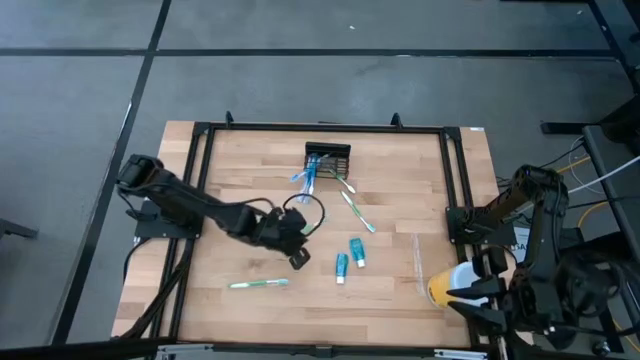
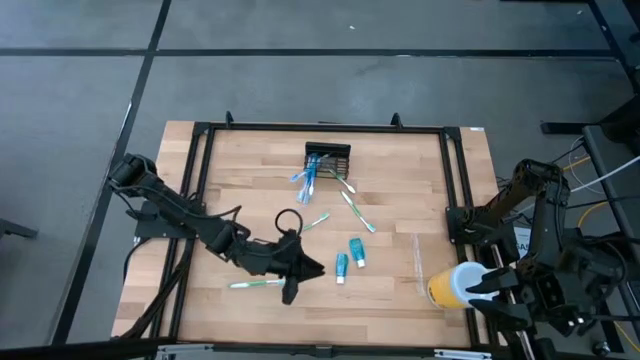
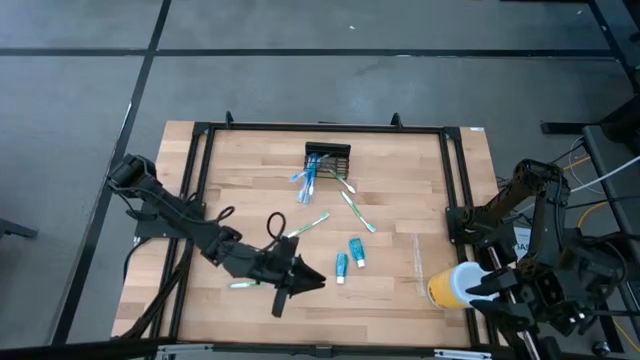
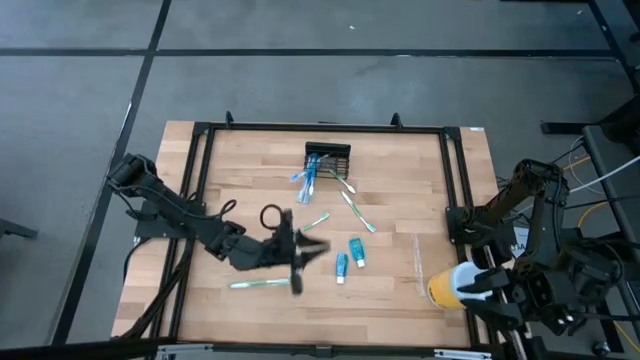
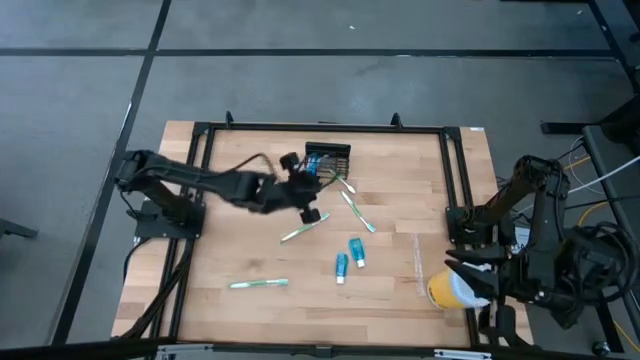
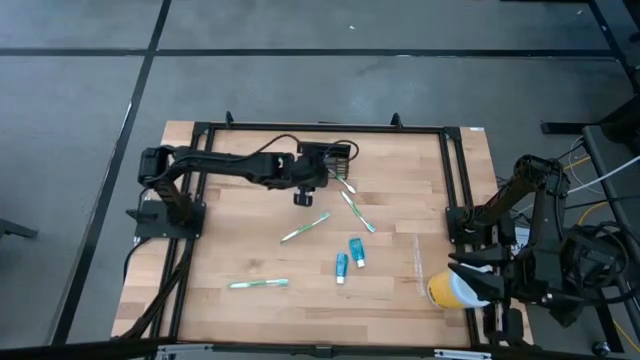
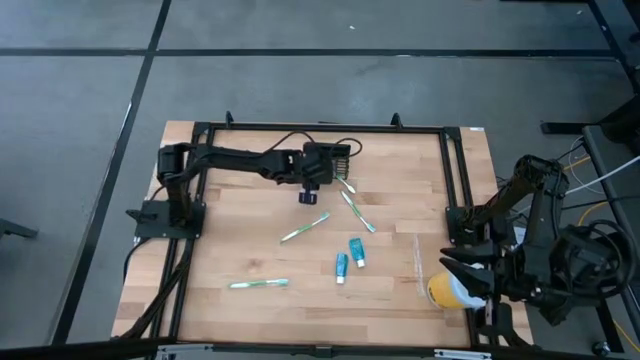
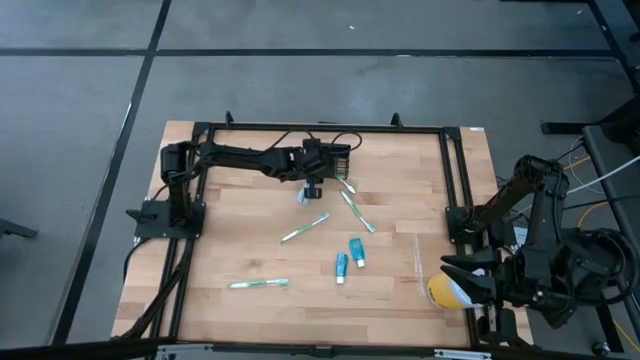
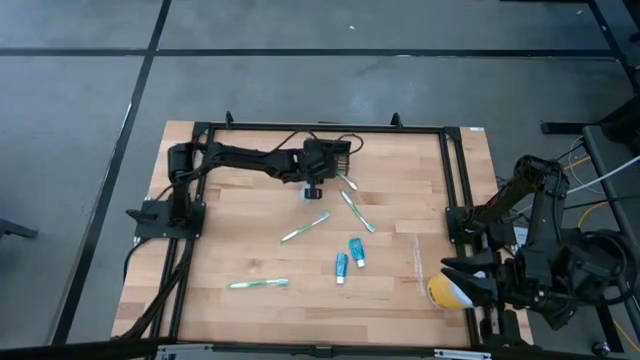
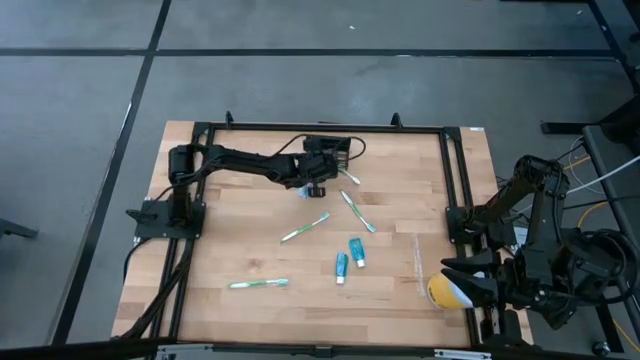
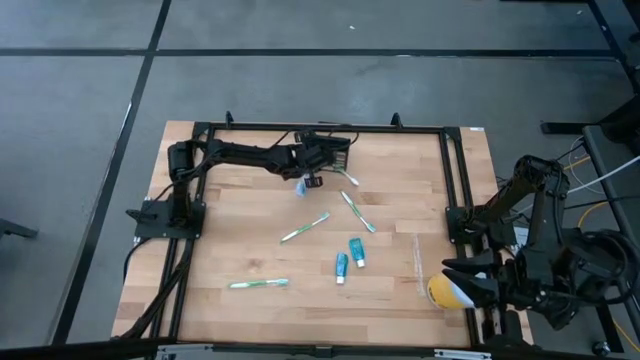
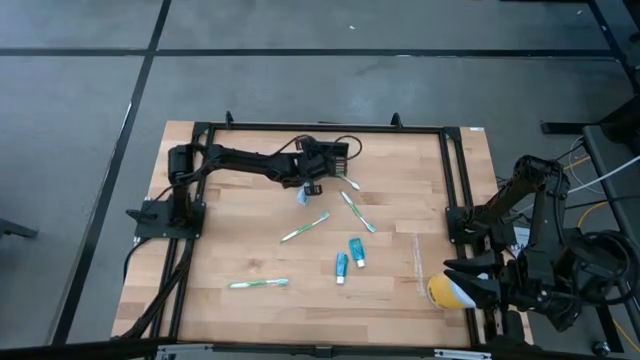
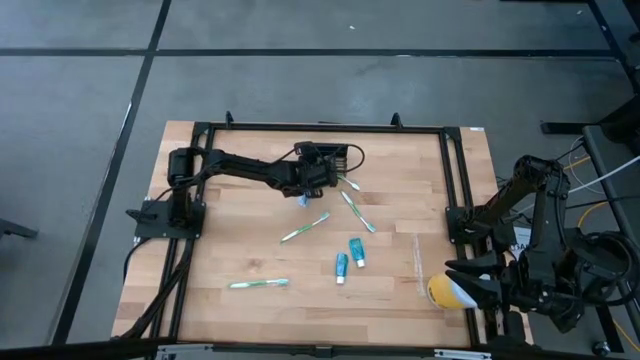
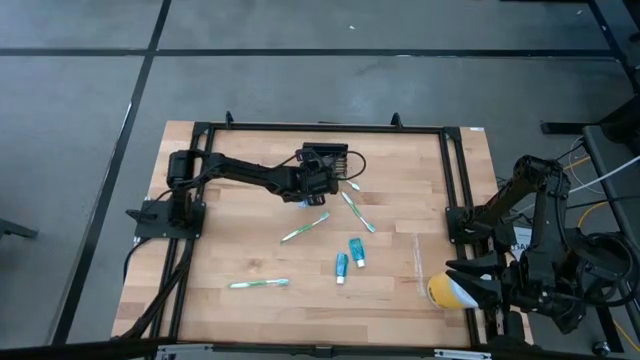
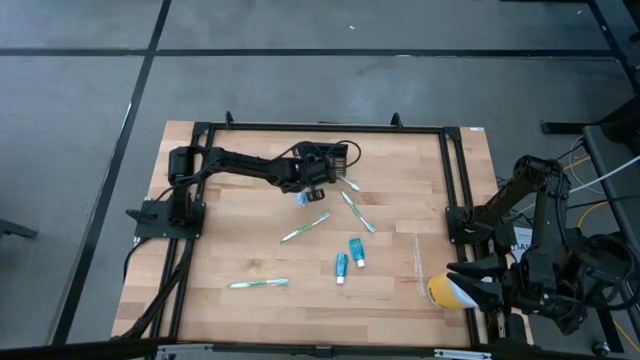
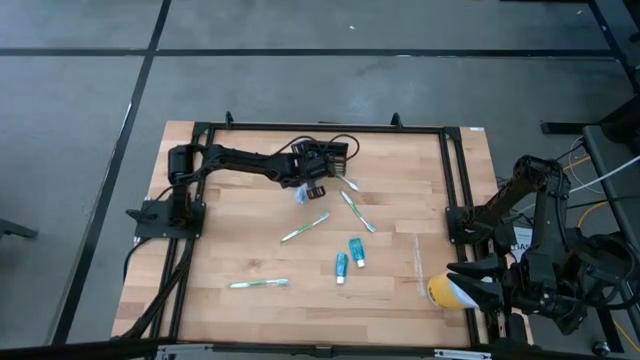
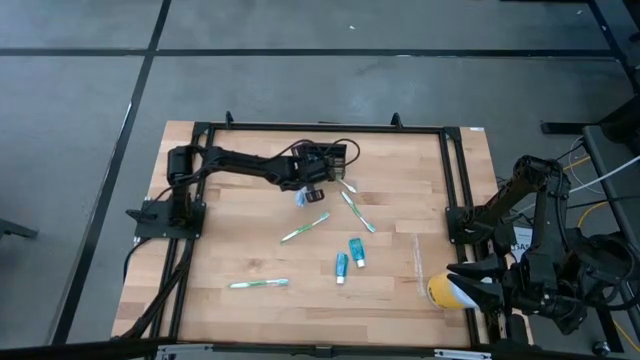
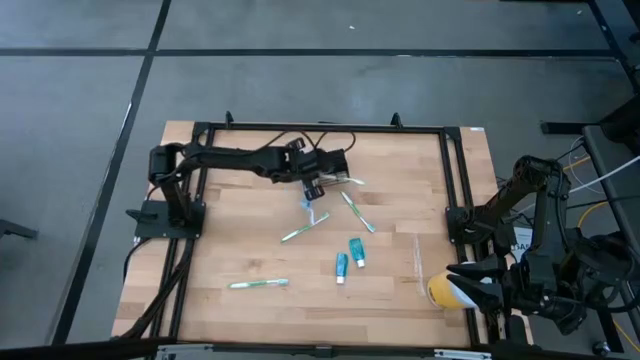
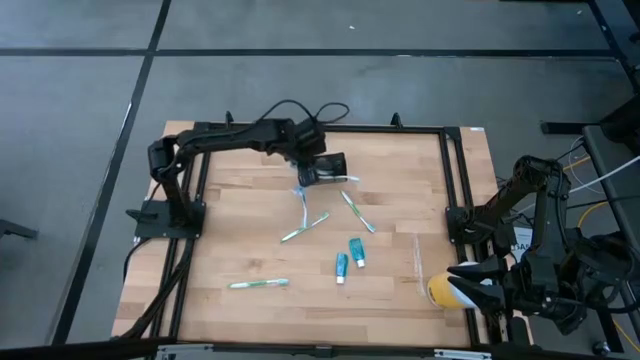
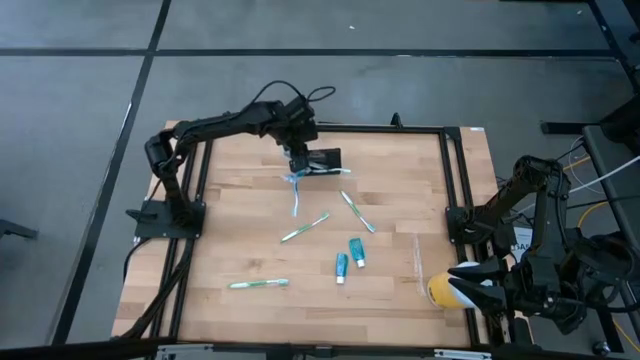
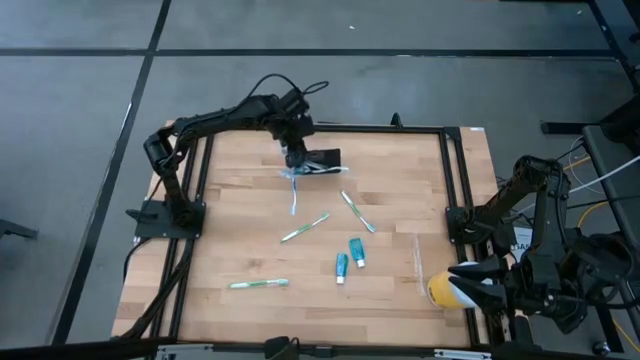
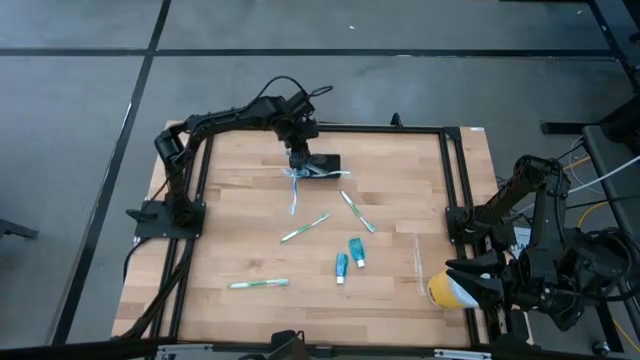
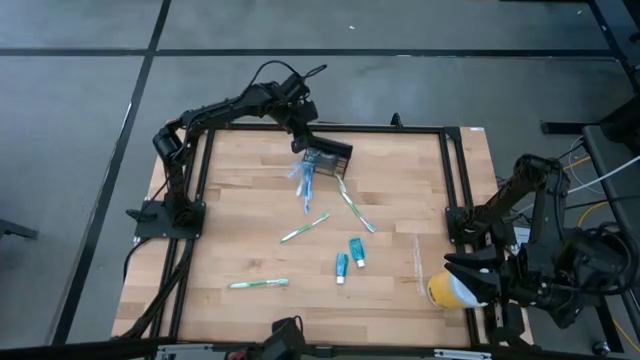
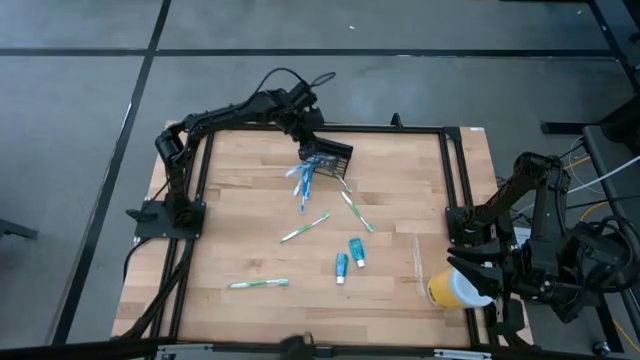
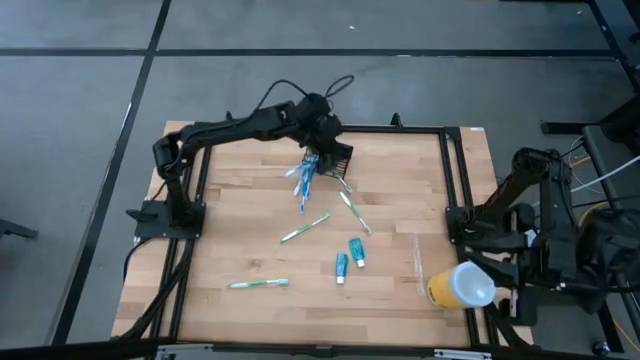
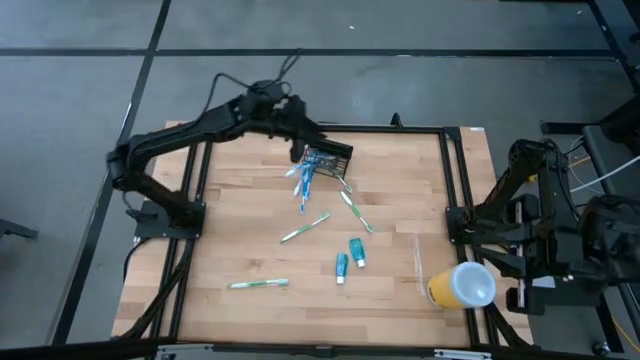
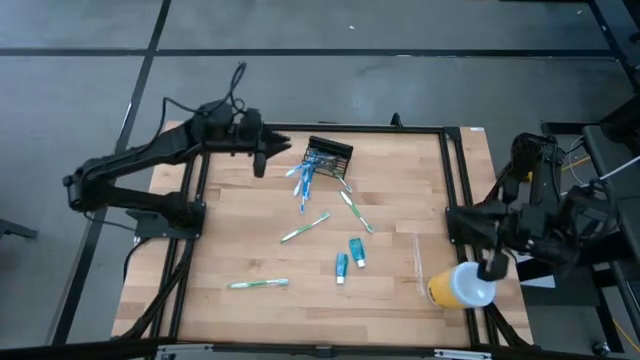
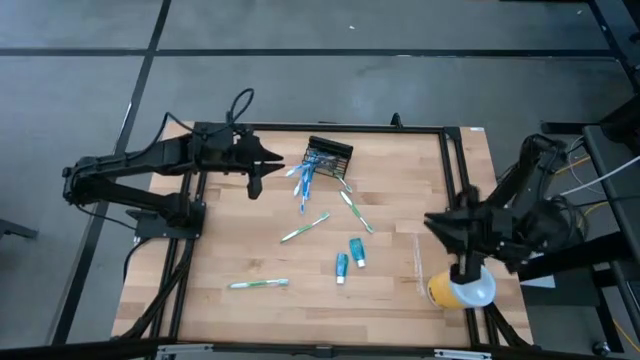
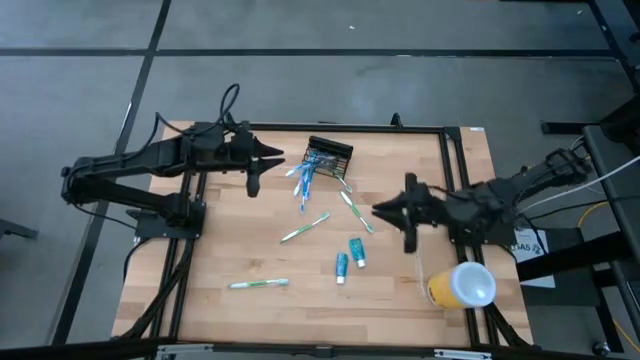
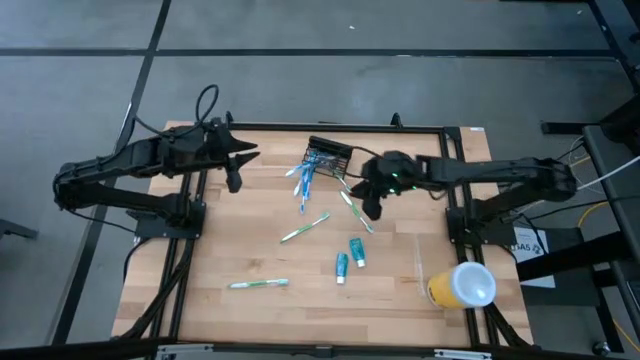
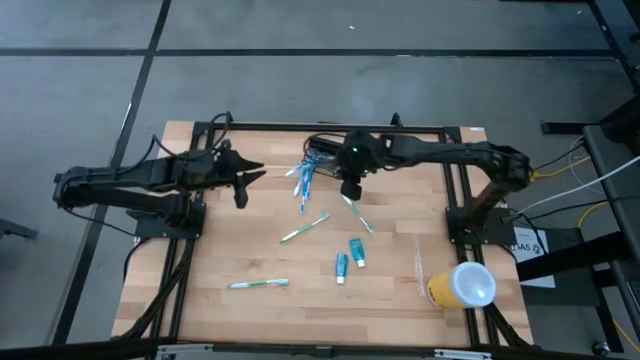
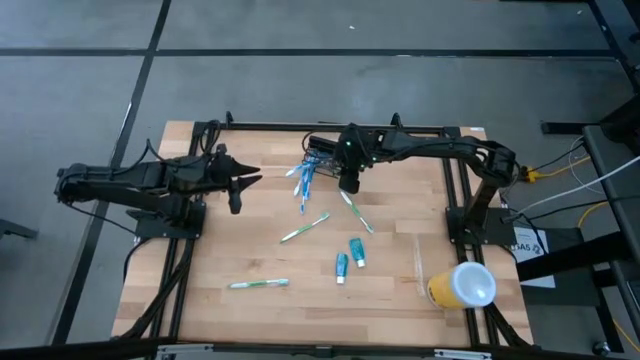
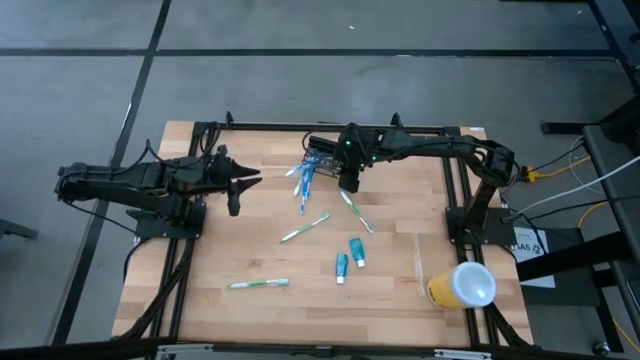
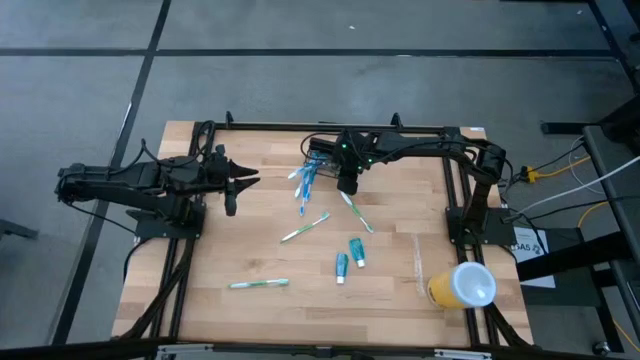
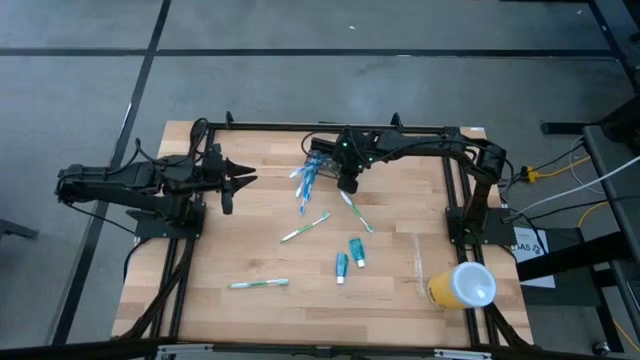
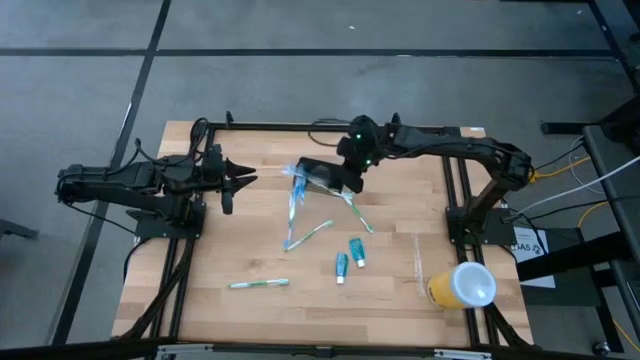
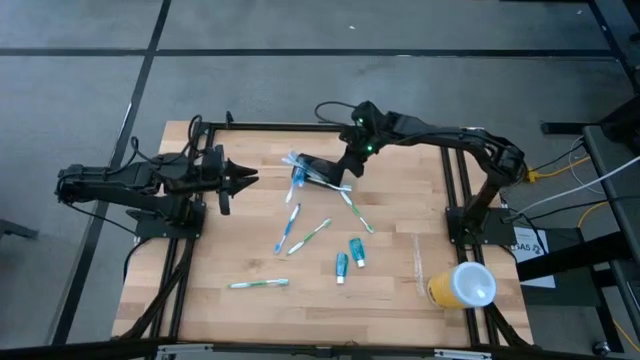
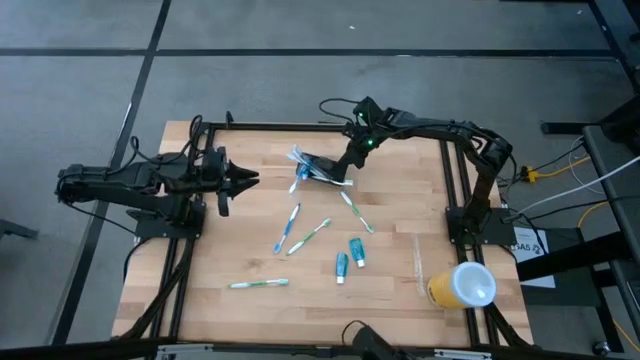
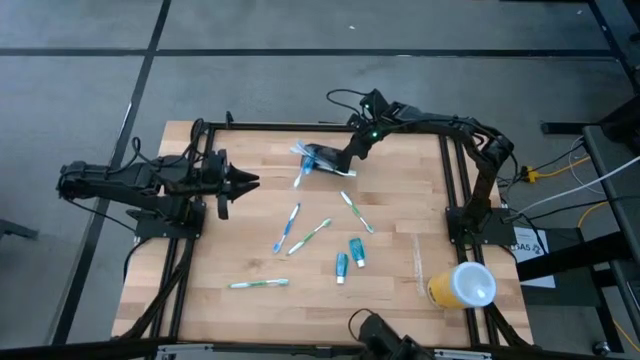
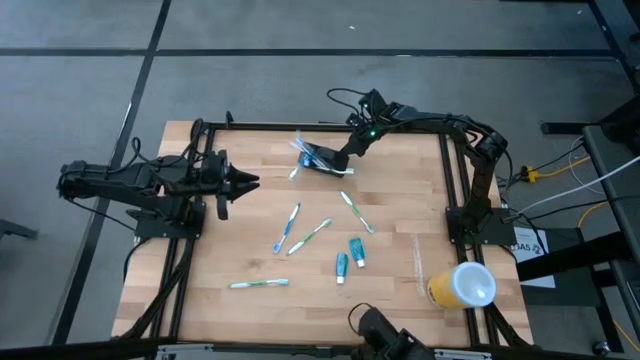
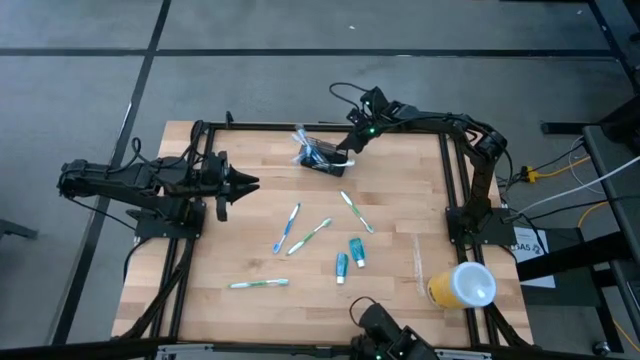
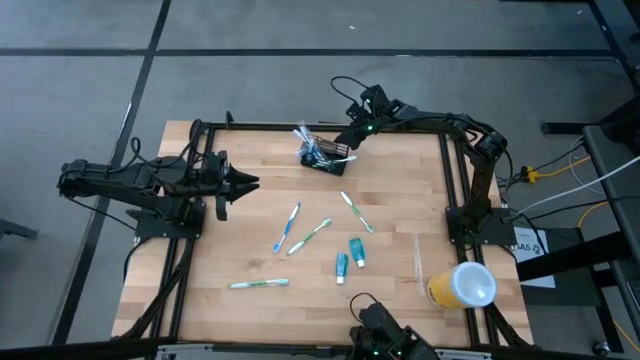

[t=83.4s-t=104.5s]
Task: Pick & Place toothbrushing station
Put the wire organizer on the top center of the table upright
